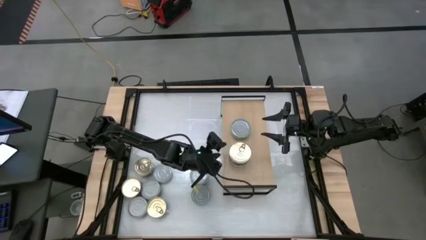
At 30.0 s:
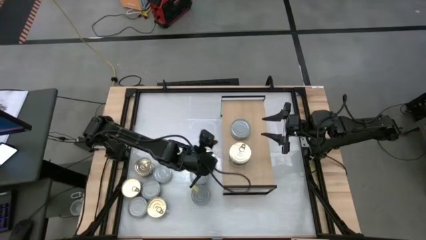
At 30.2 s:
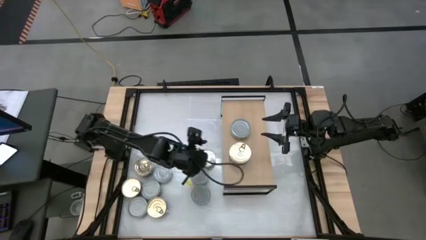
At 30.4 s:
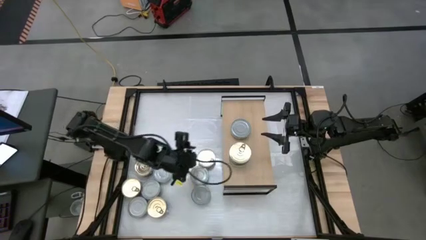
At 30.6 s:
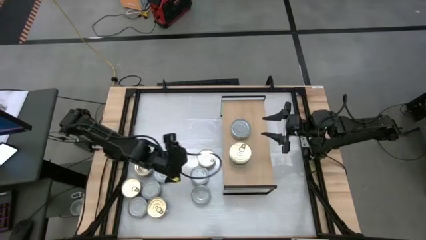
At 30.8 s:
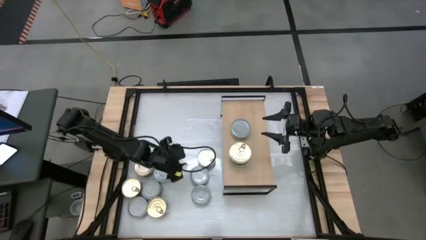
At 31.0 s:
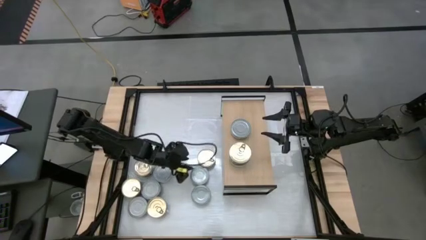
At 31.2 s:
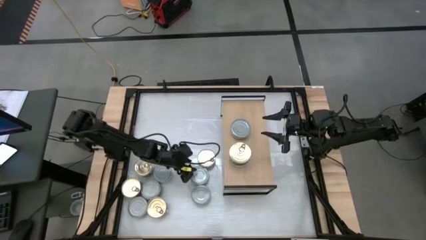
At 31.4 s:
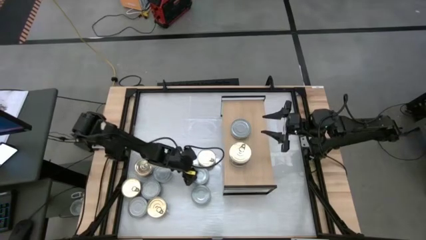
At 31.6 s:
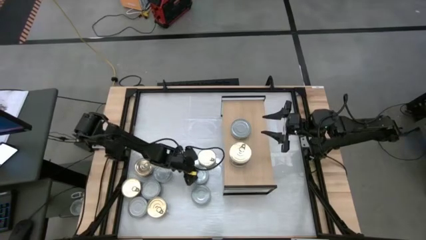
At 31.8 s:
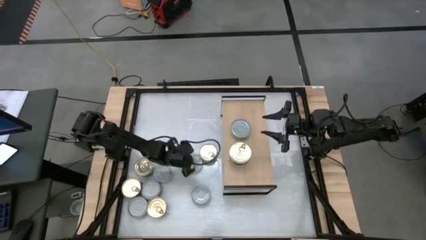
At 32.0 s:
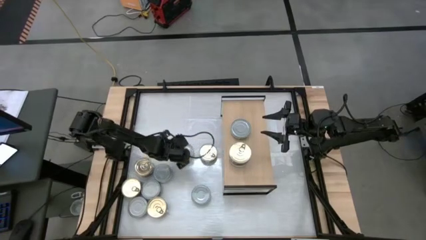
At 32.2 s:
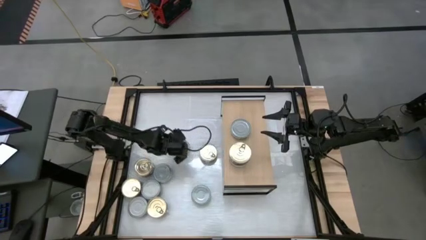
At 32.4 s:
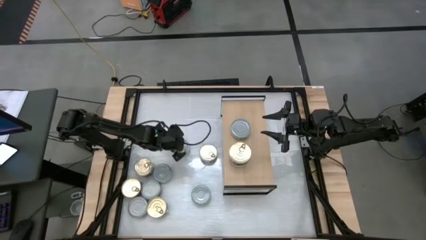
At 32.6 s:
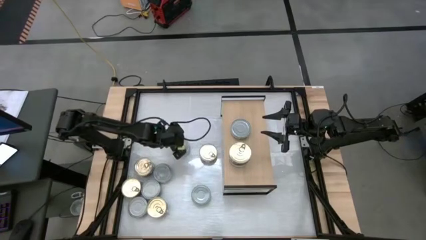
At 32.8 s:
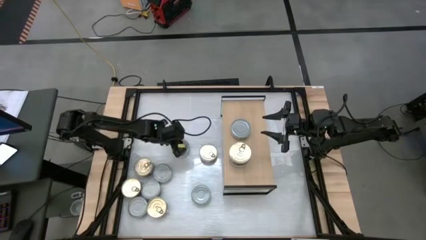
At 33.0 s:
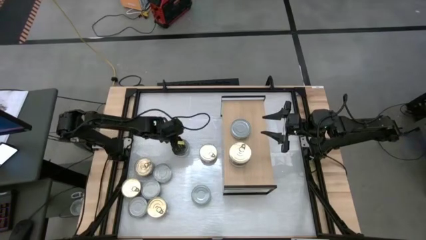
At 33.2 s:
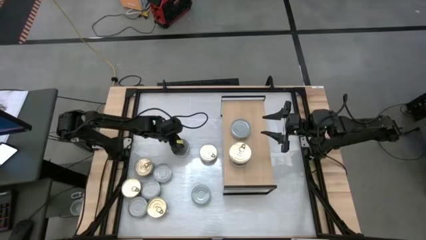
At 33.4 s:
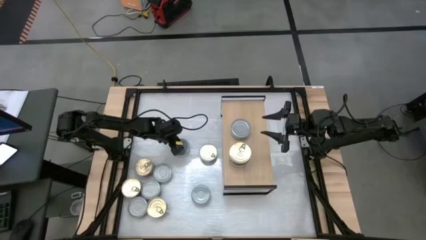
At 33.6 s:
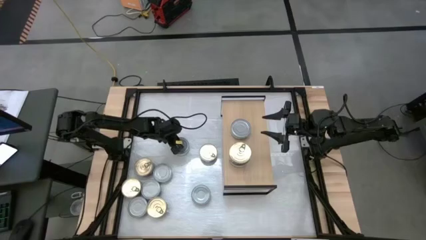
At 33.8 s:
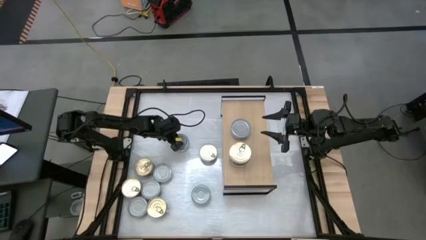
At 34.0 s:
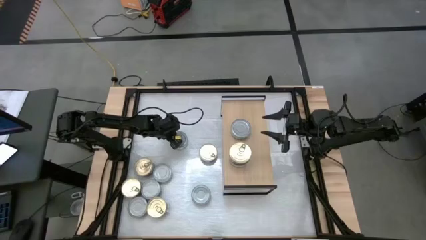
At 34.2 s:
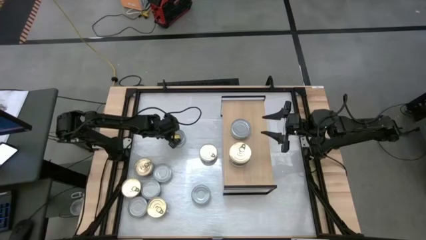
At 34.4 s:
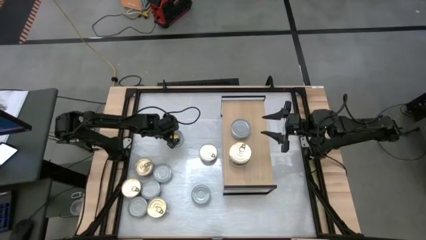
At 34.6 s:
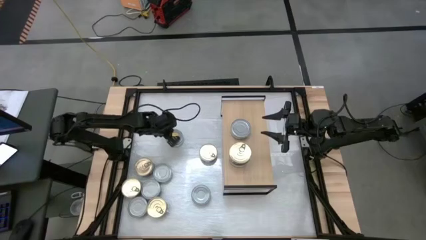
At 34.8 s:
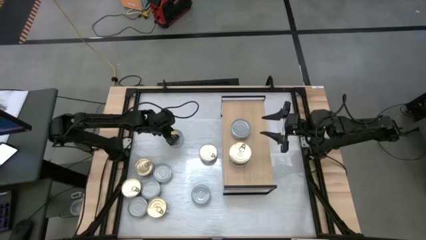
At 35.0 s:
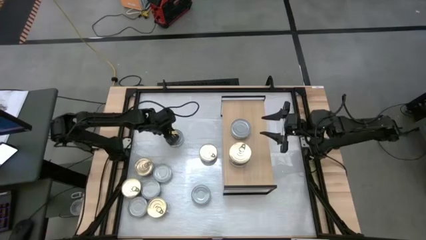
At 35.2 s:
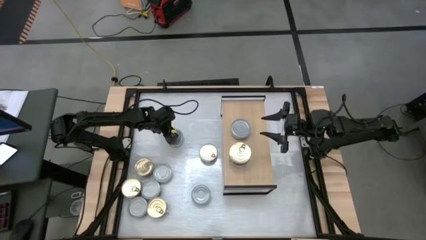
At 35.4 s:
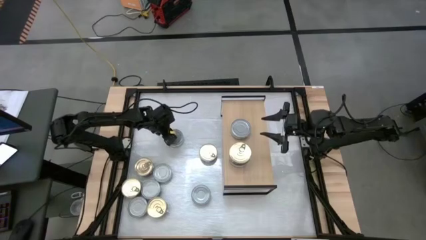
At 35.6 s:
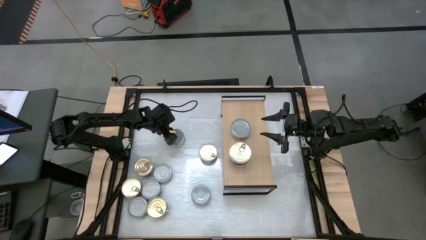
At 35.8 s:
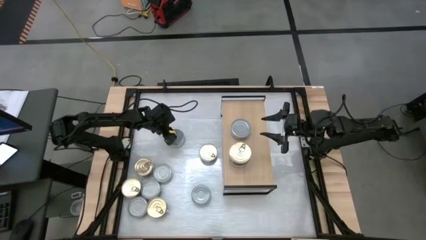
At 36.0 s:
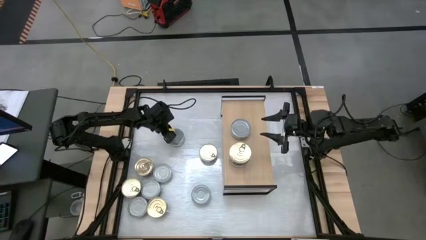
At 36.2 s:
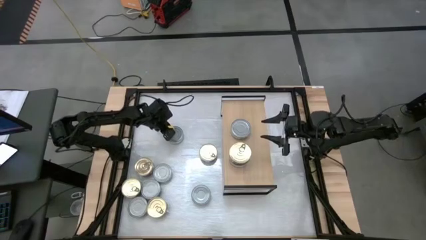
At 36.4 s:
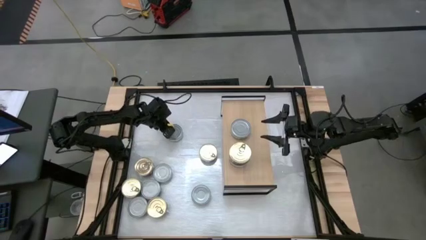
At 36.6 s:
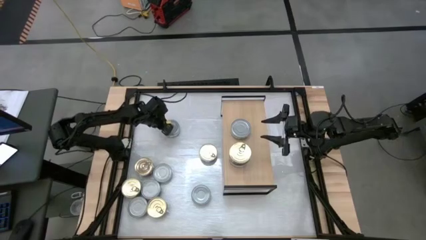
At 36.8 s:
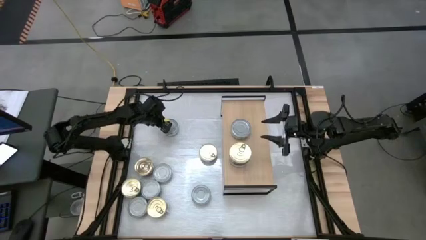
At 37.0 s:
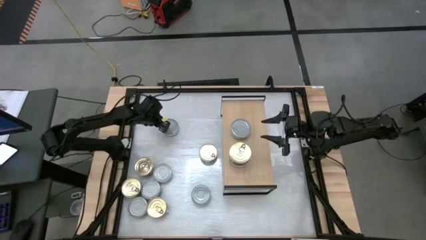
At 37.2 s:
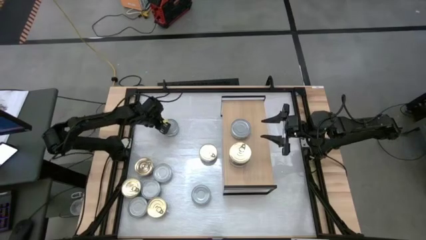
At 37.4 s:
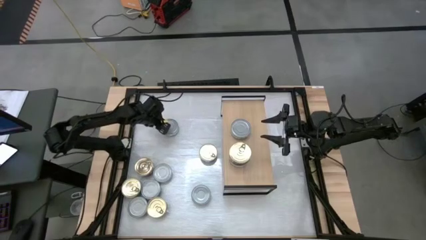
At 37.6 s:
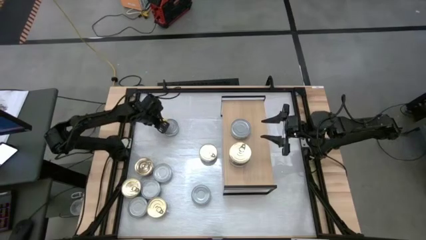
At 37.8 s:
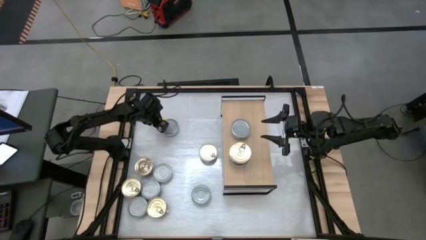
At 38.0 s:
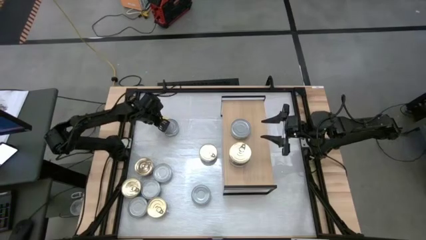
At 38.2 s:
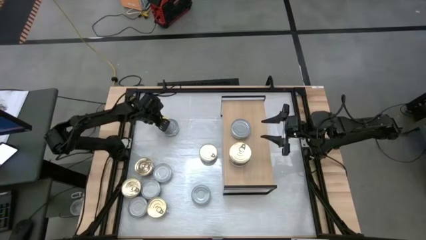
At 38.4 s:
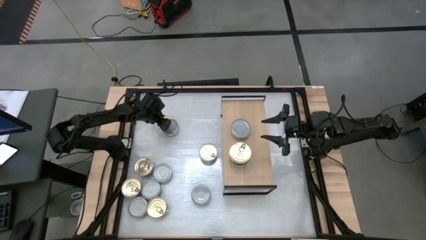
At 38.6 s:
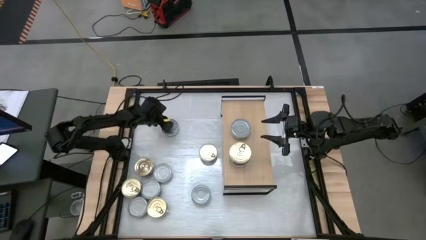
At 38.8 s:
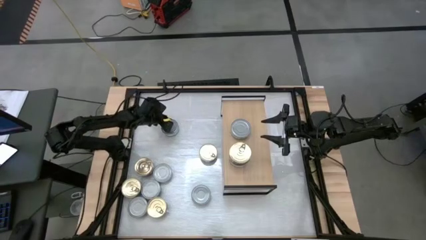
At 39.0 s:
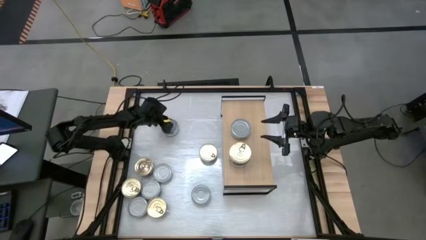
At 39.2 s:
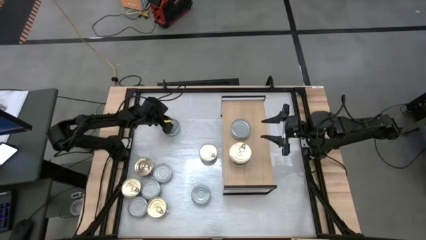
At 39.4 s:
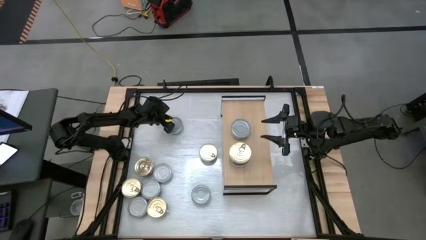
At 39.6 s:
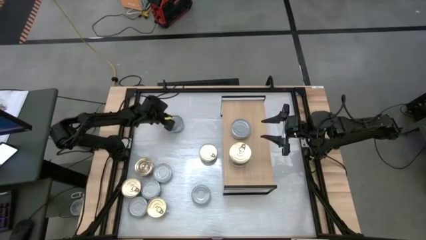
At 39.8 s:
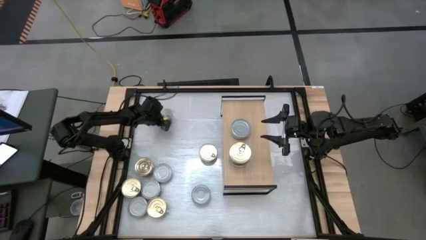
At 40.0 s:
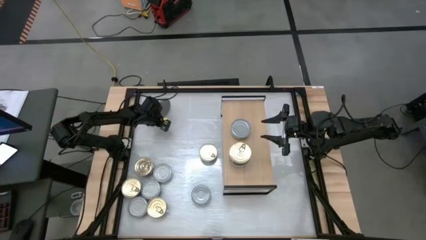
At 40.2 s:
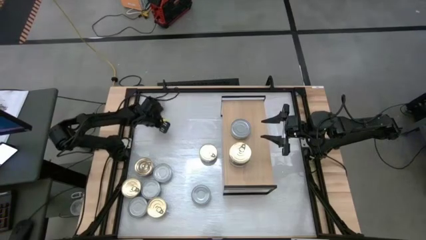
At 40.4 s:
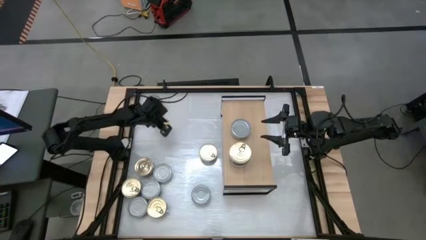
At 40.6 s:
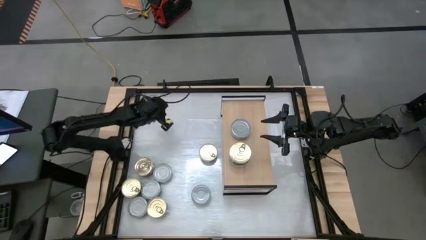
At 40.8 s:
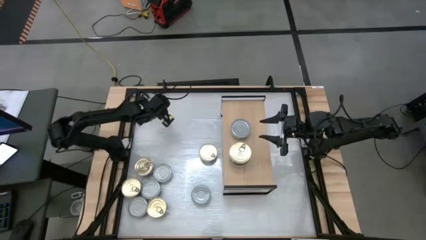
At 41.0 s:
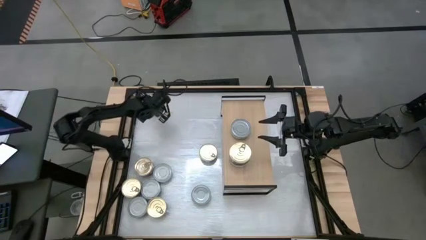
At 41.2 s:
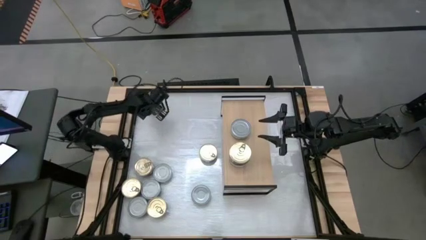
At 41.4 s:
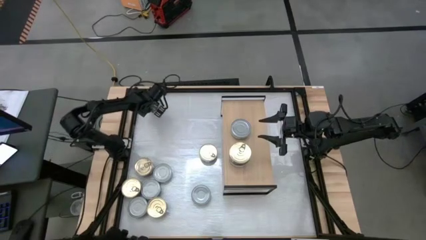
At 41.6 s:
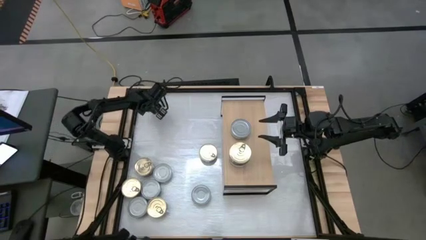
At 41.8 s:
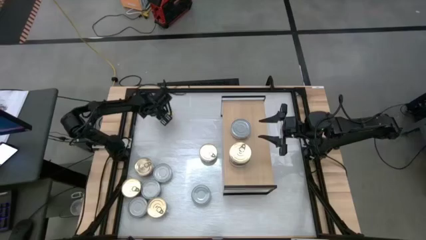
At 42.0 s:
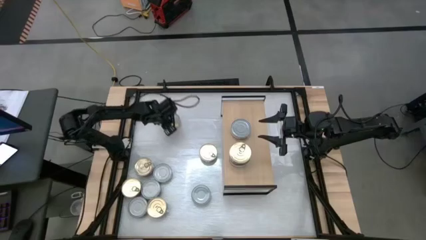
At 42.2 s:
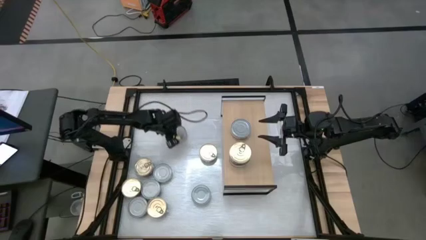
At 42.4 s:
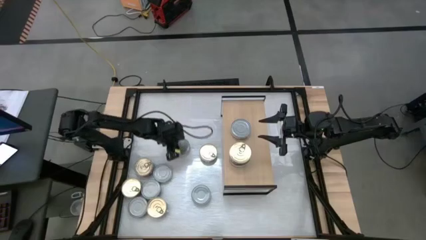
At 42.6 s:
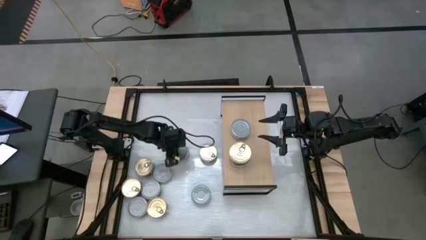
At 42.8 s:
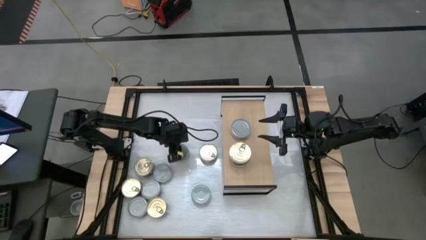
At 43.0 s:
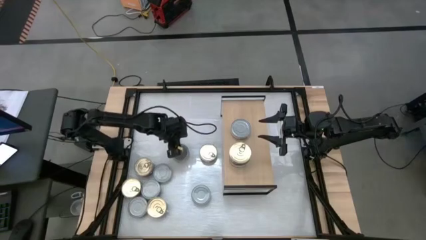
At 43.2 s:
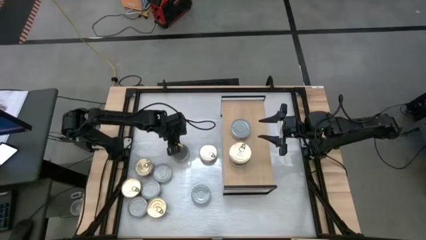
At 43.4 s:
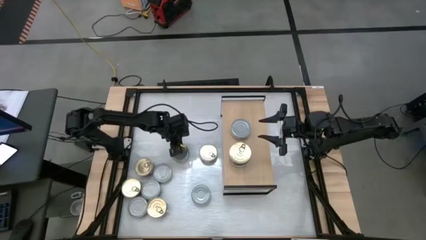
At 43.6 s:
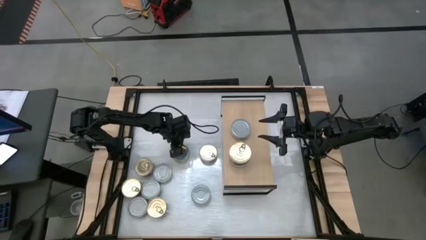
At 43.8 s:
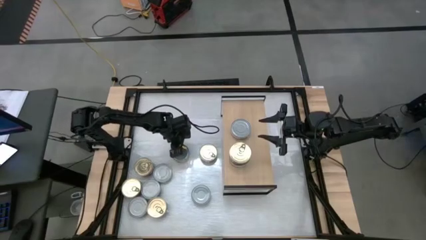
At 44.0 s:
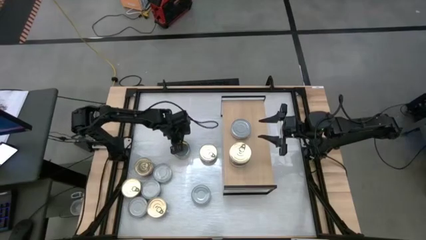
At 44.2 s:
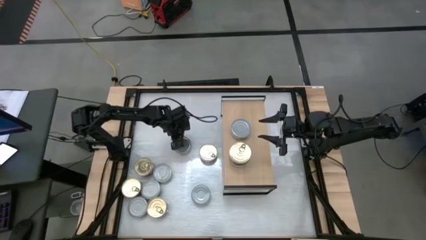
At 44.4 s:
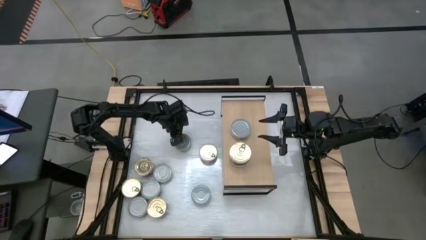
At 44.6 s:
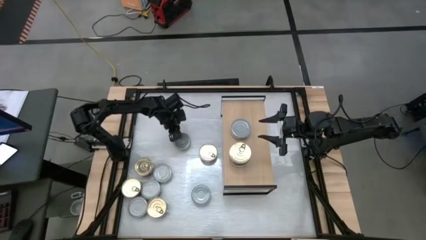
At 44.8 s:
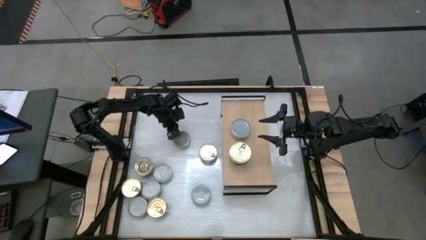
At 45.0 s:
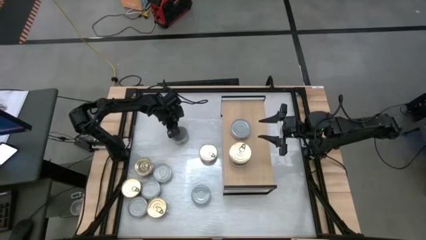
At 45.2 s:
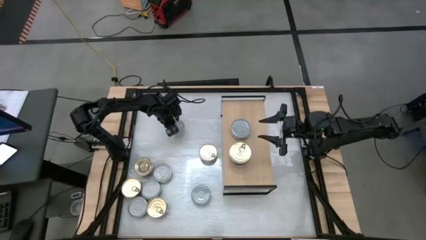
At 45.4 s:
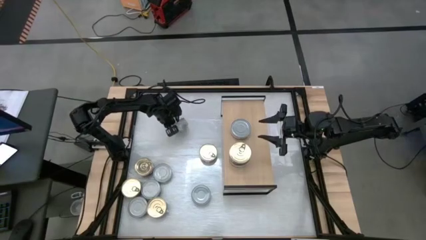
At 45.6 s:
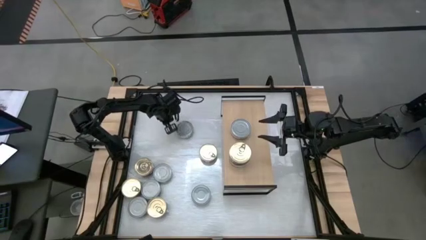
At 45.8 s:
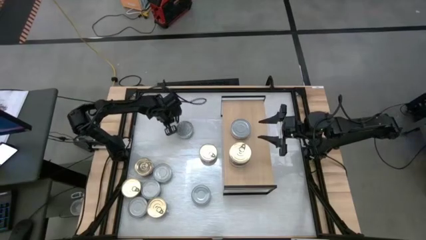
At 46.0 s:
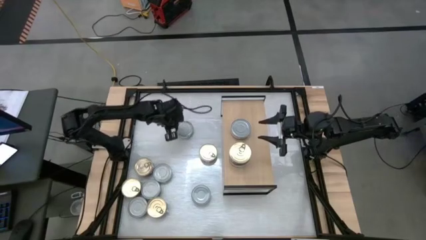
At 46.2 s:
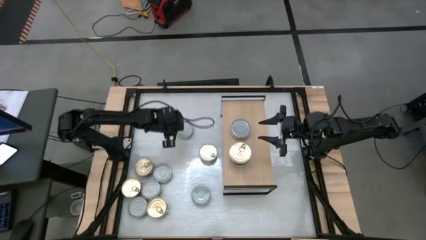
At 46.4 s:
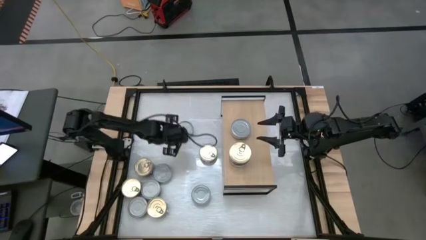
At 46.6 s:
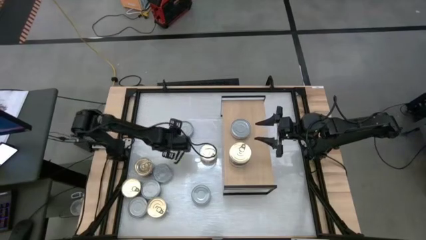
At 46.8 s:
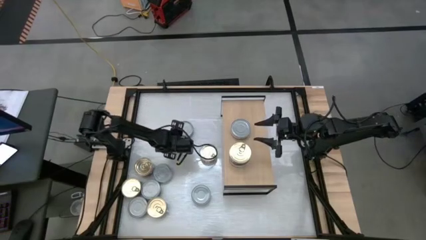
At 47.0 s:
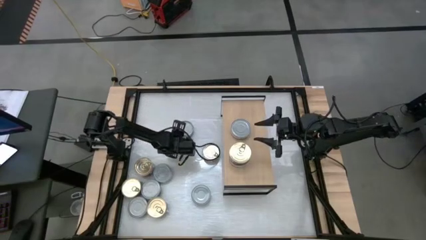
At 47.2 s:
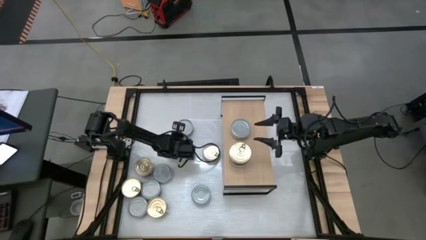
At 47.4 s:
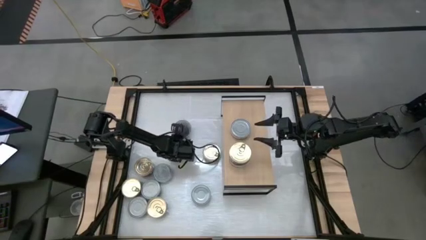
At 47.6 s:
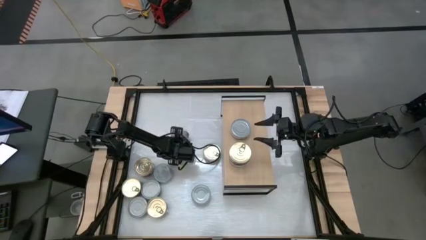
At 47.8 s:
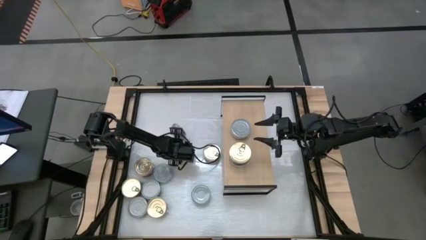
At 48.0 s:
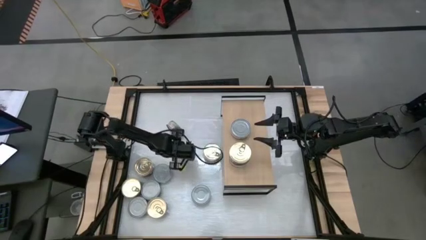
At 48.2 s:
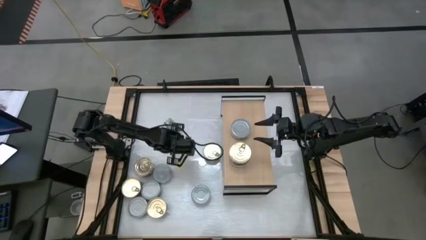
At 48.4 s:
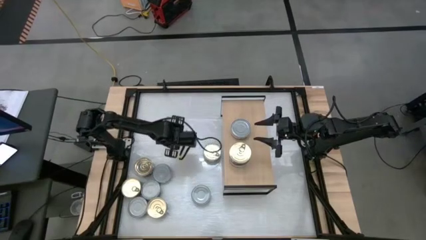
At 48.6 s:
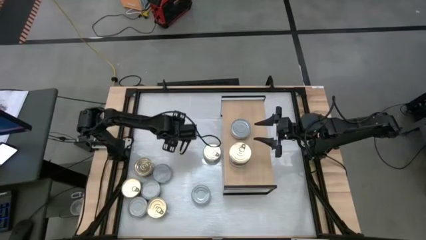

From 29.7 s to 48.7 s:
Task: Stack canned seafood by type on shelf
Stack the green tuna can on top of the green tuna can
